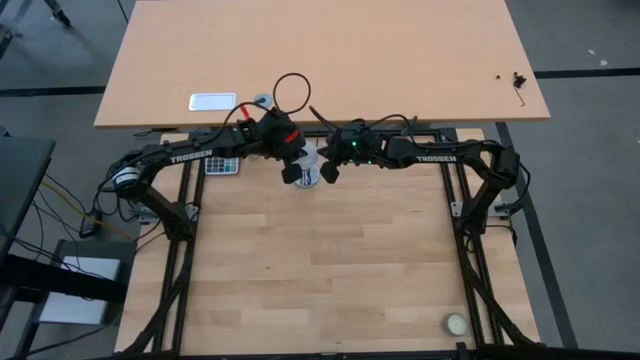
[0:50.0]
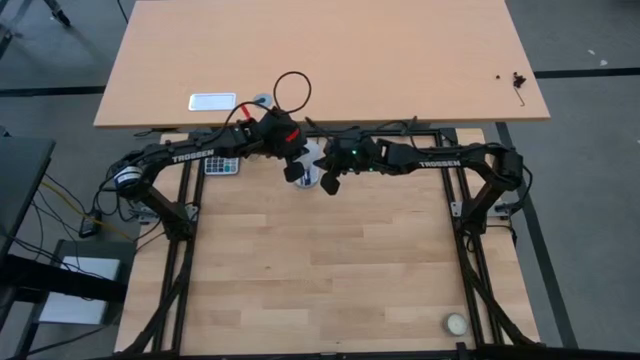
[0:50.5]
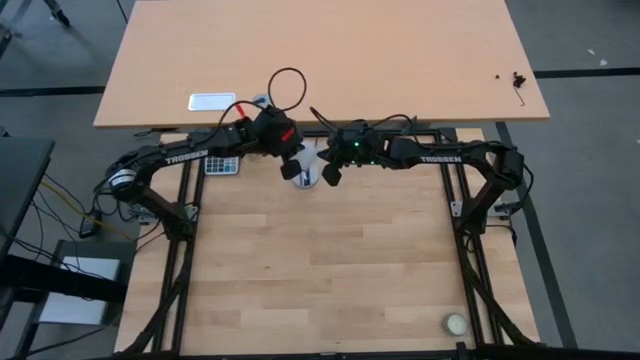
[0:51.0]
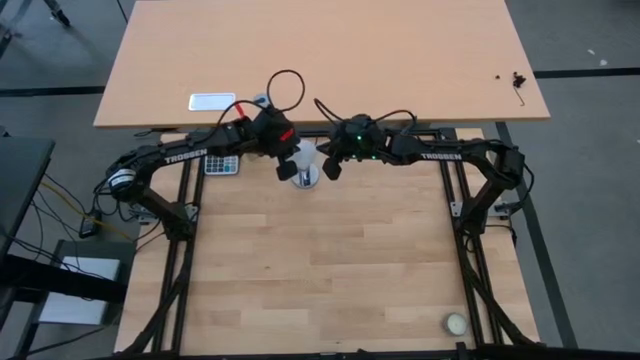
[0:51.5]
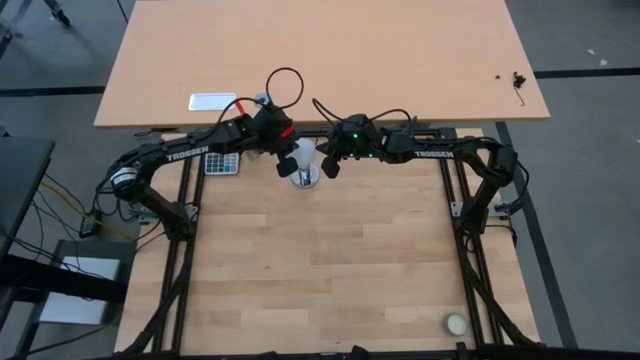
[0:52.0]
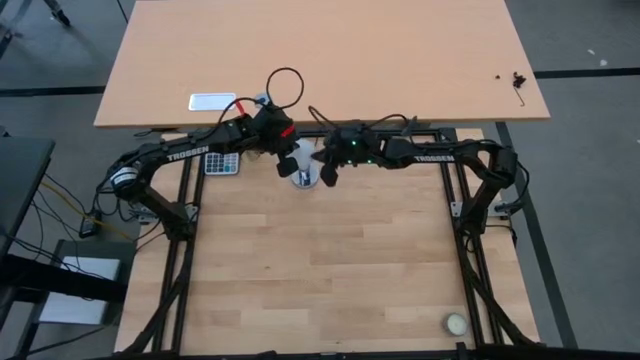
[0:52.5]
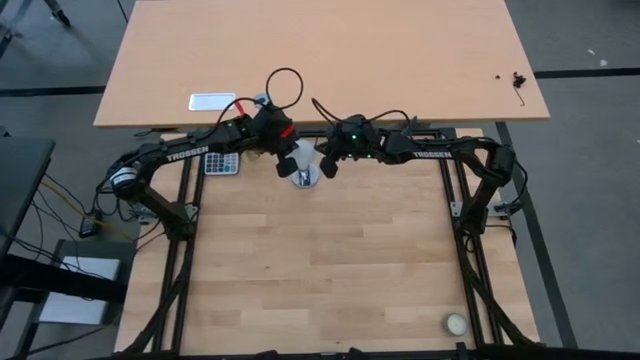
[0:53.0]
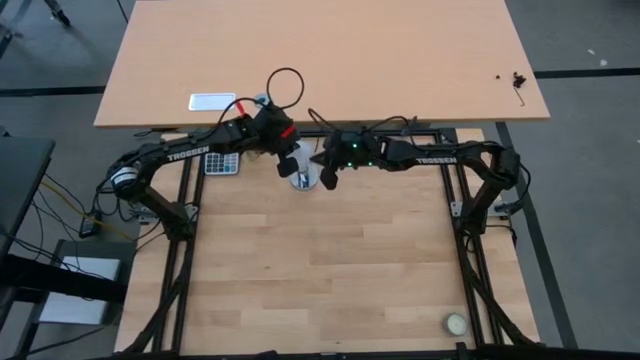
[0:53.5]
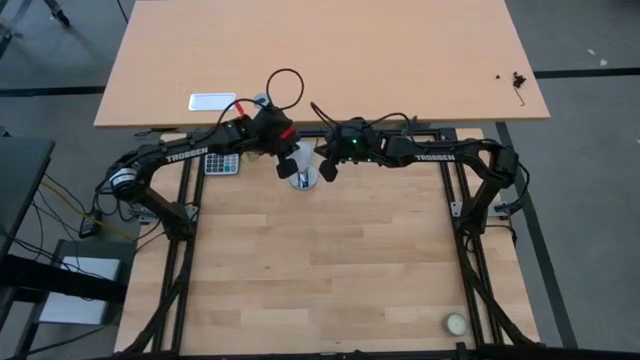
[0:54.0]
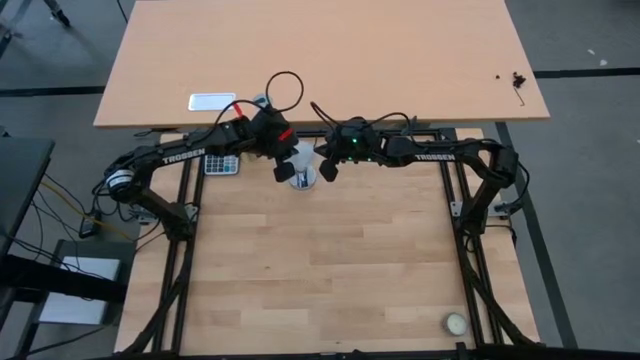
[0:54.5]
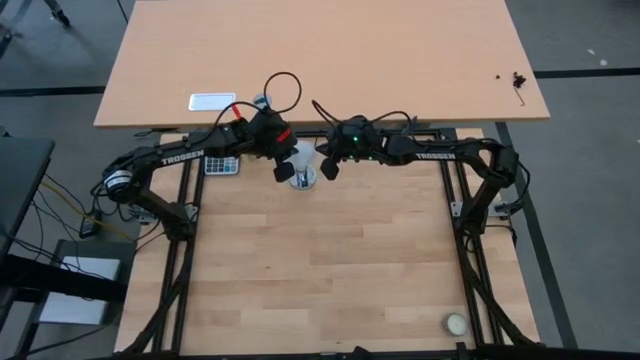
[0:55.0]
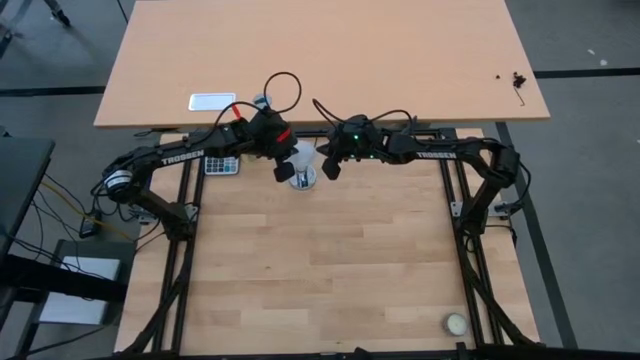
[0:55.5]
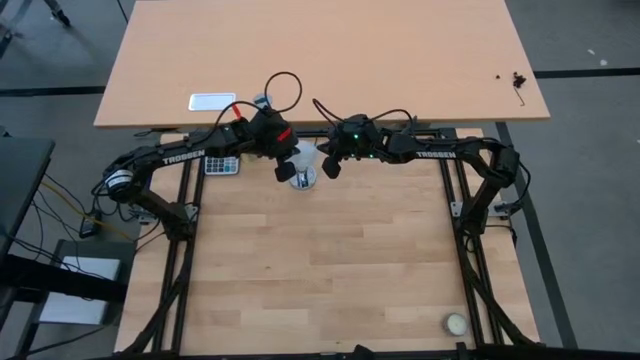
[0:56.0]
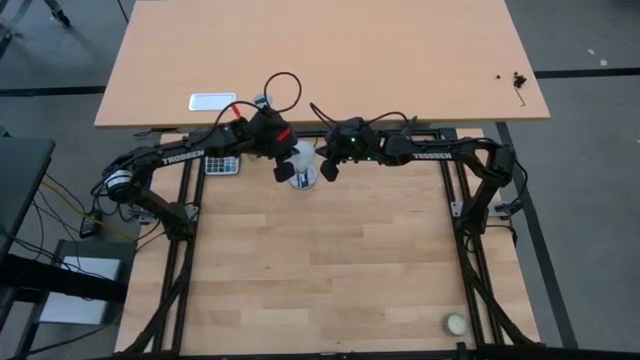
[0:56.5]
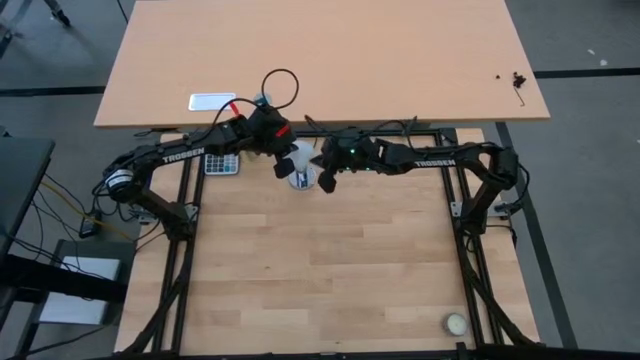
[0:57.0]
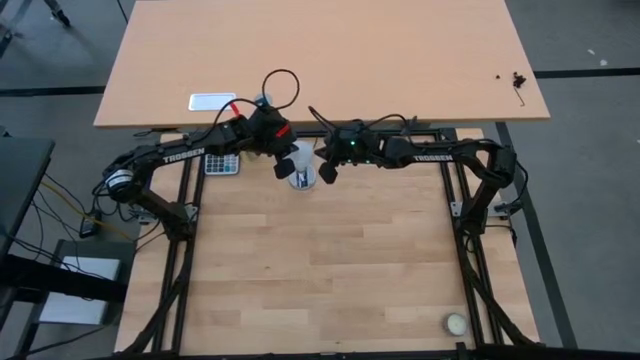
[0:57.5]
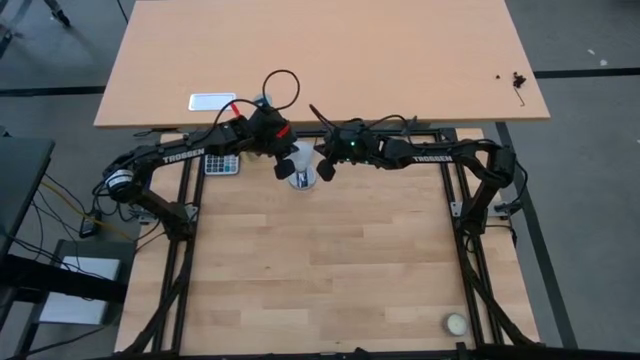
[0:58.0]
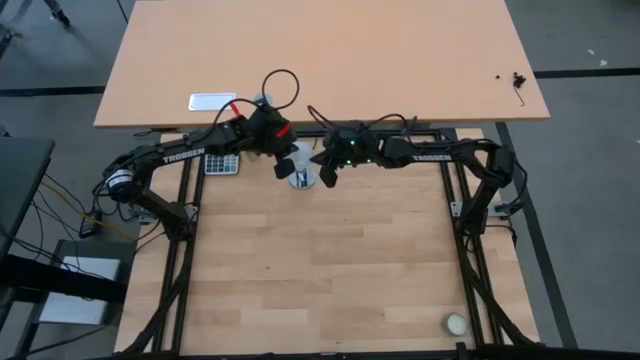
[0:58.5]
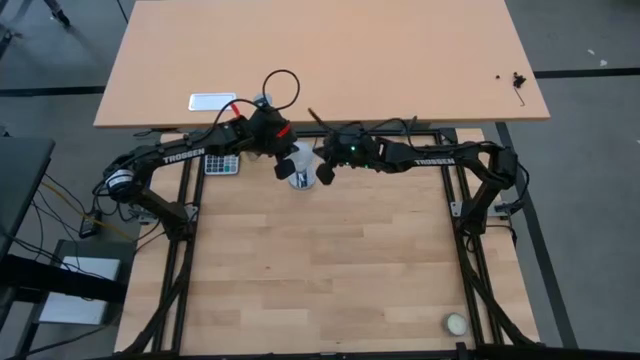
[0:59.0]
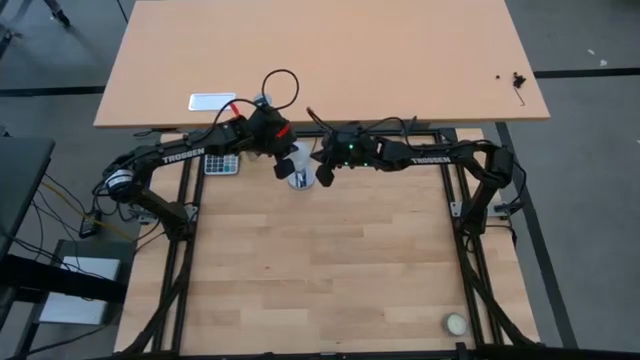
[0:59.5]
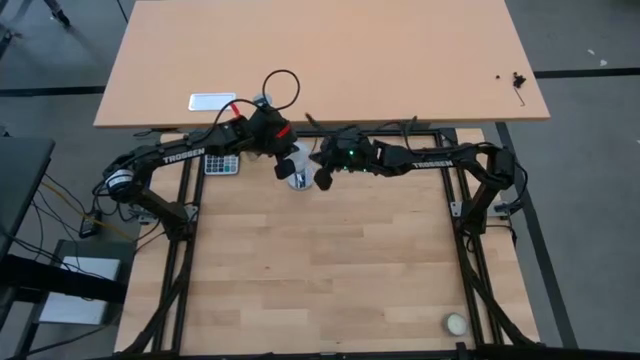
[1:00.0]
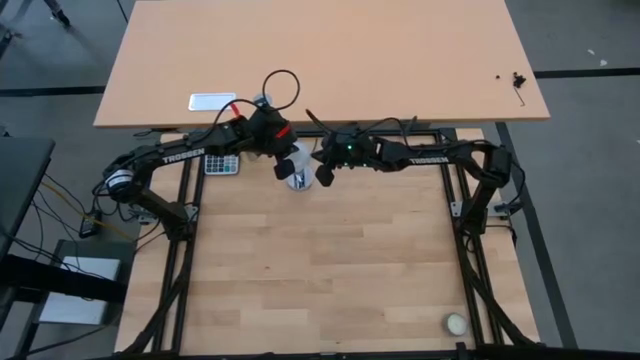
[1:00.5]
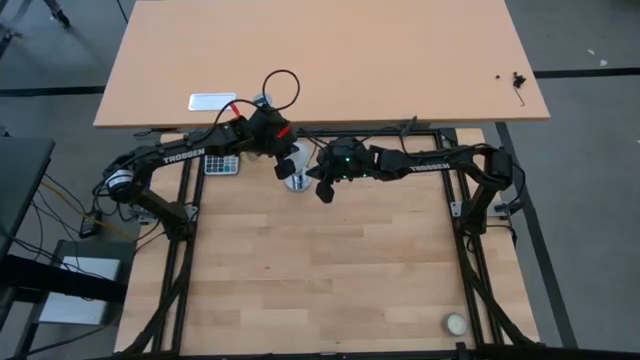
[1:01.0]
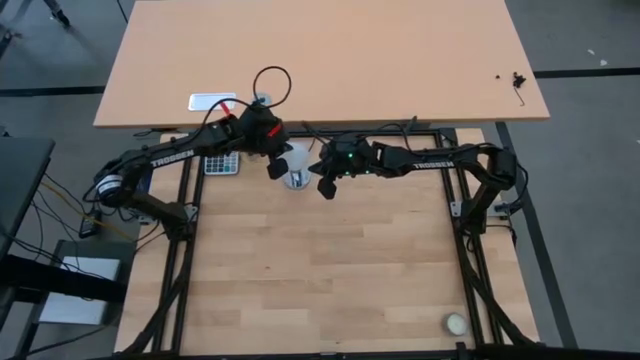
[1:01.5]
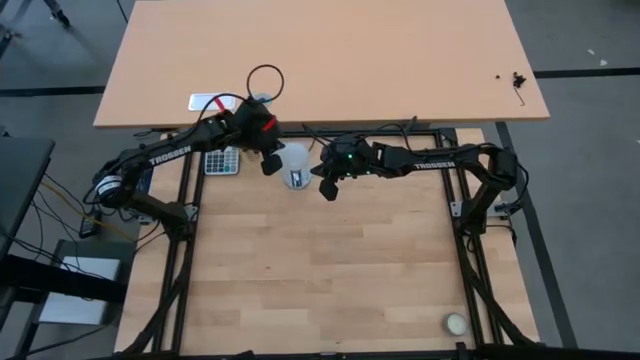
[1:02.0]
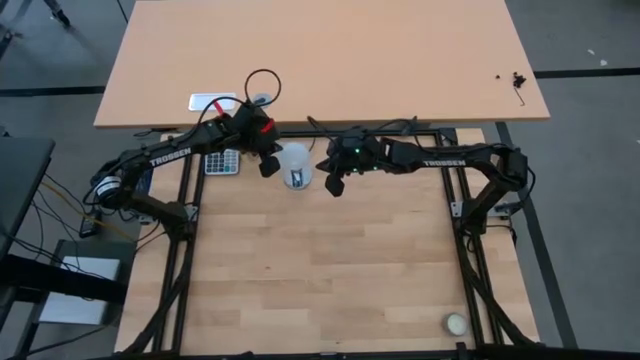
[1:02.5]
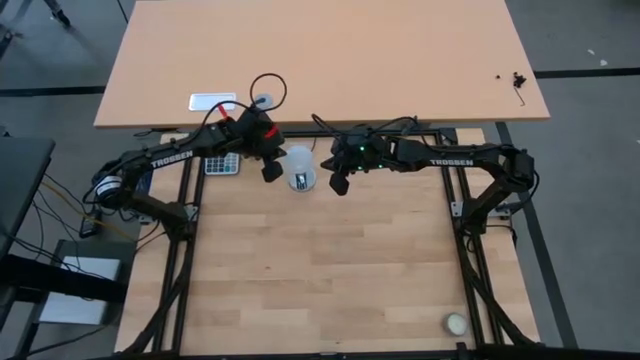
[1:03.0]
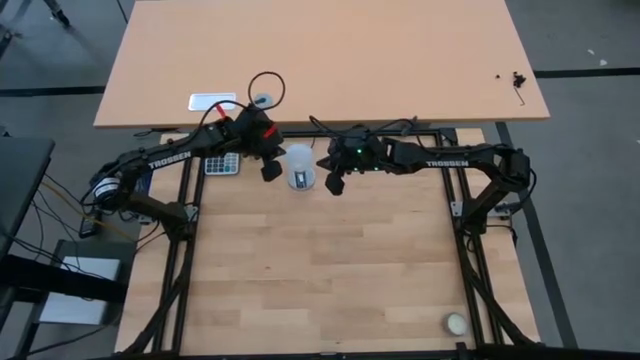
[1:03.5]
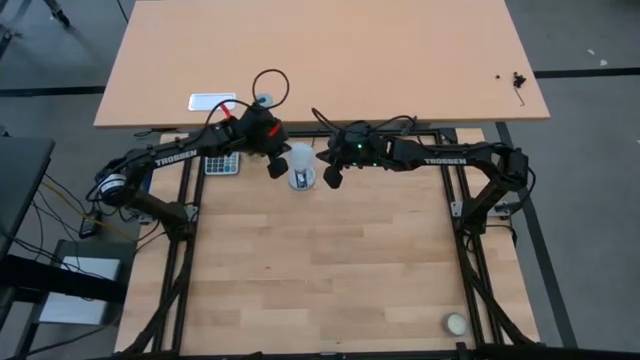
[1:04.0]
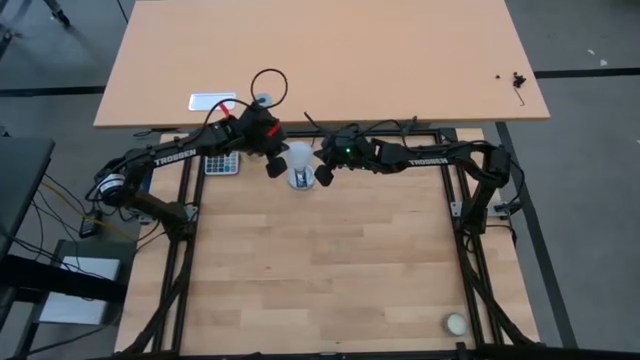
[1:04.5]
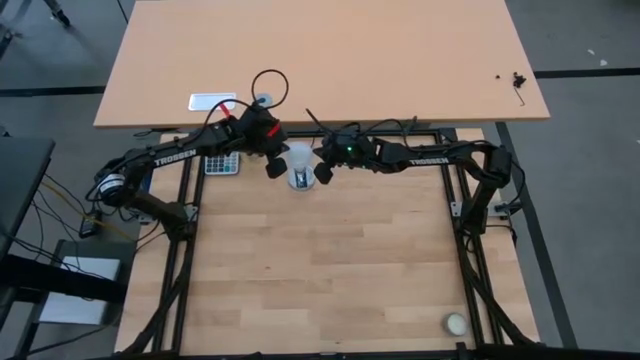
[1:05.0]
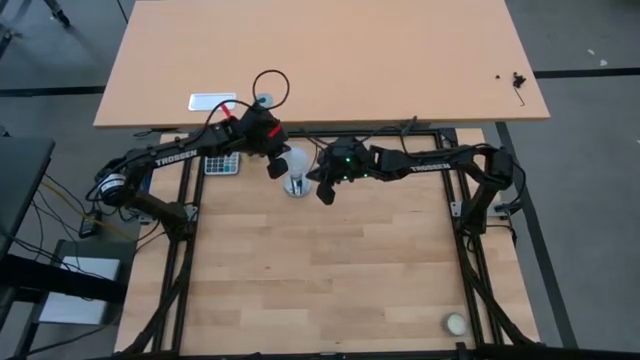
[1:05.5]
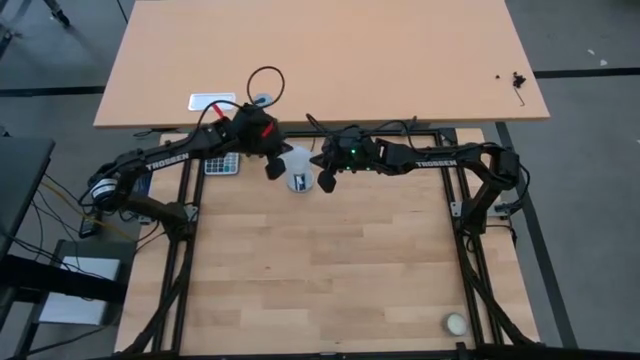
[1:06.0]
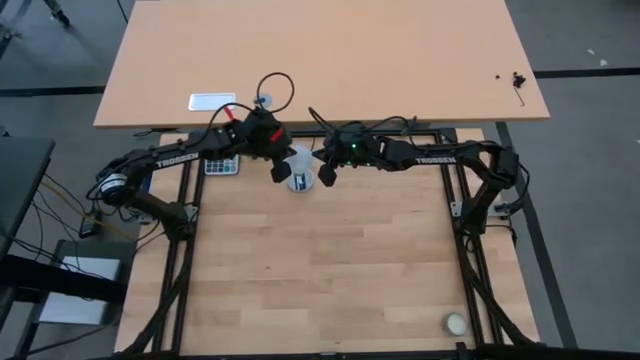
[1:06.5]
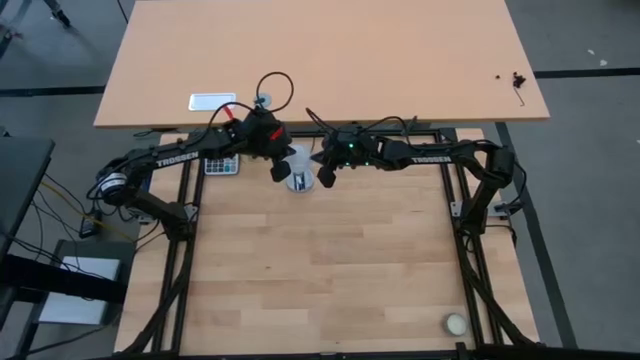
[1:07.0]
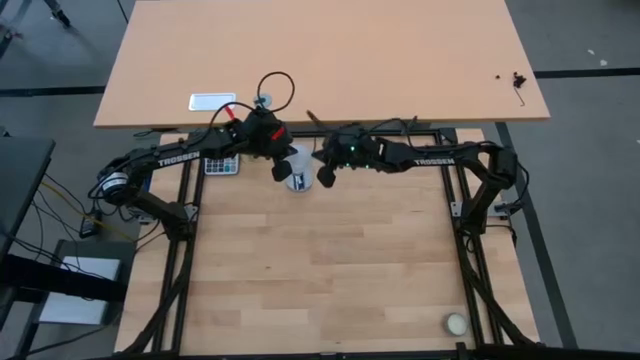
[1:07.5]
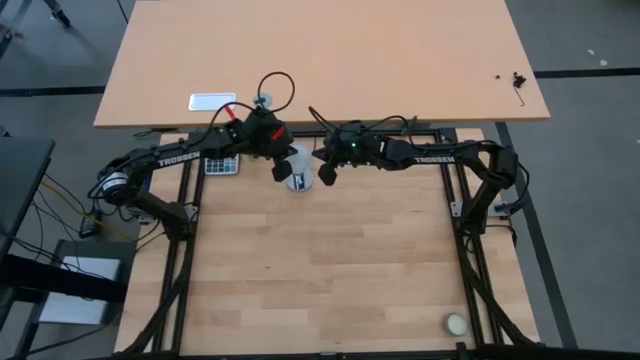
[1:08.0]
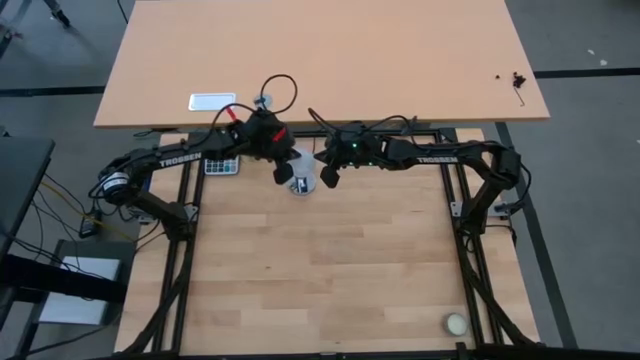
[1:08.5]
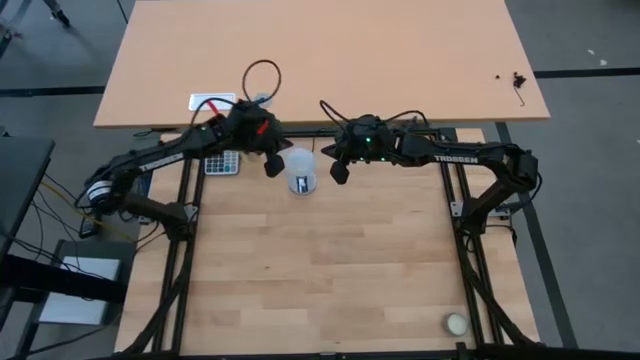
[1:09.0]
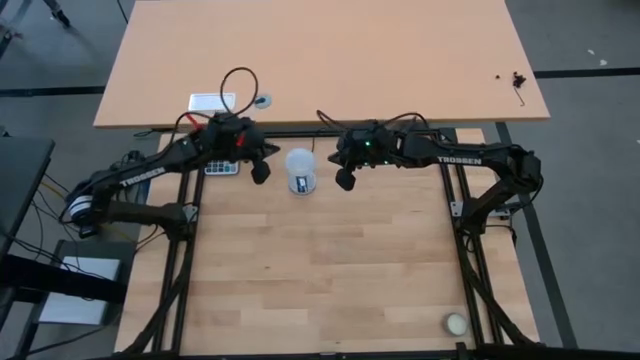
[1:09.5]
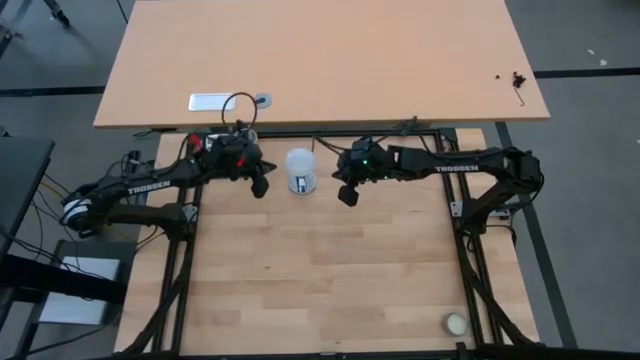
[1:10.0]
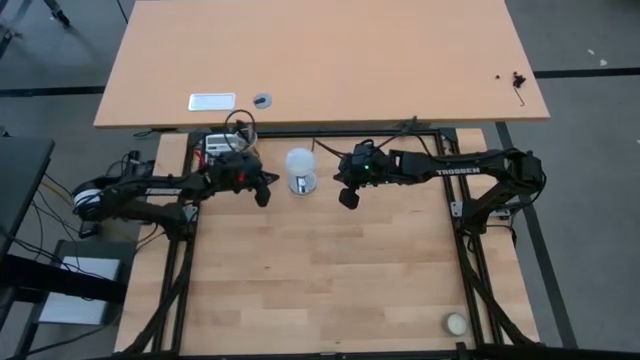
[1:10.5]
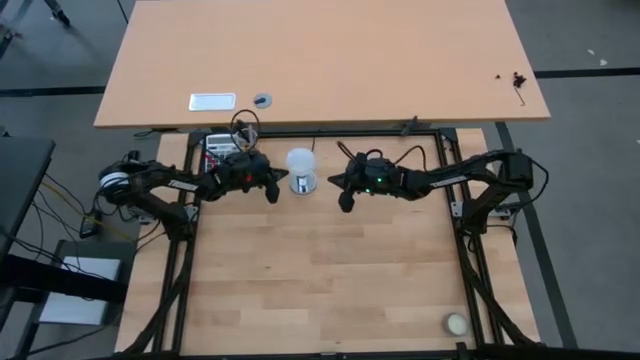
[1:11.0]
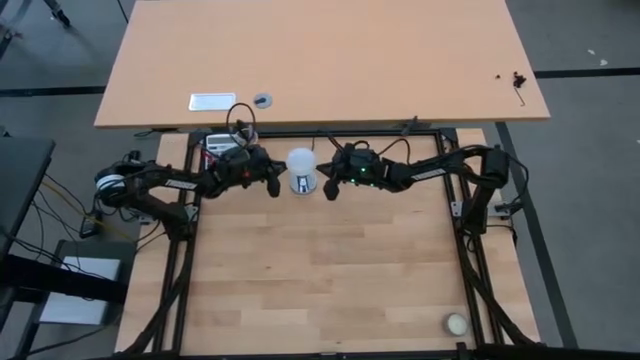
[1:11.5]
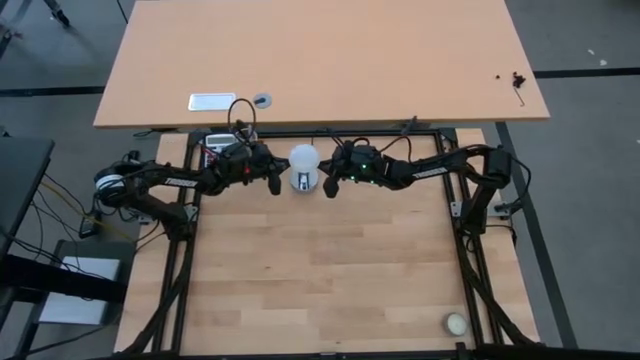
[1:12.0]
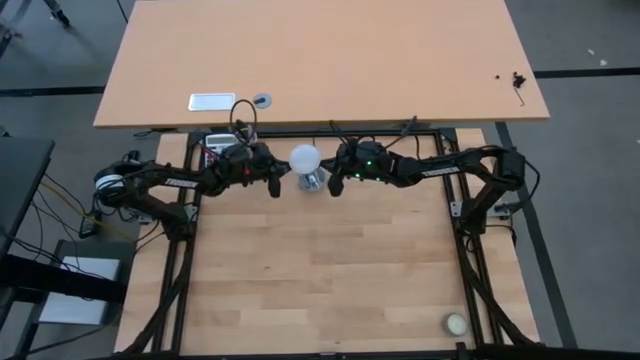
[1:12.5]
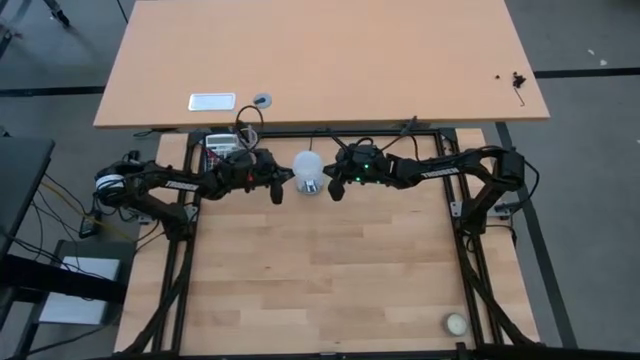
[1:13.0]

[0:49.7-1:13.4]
Task: Screw lightbulb
Insert the white lightbulb on the silver lamp
